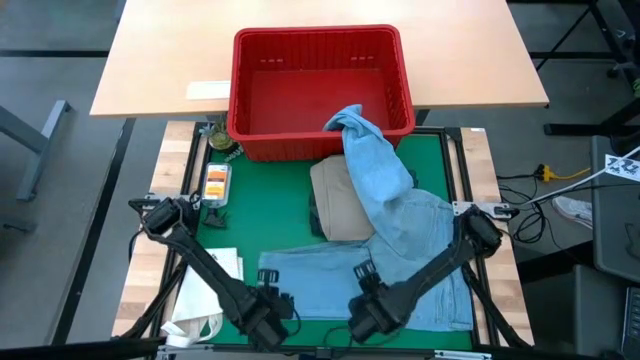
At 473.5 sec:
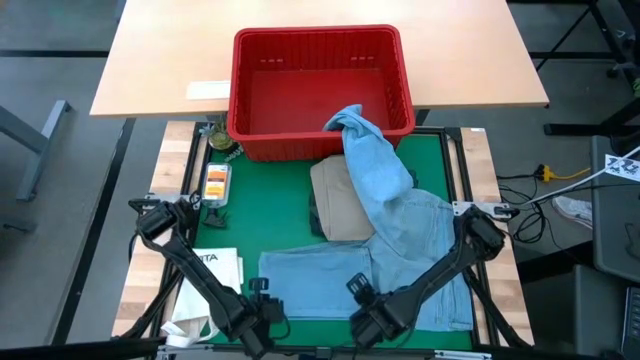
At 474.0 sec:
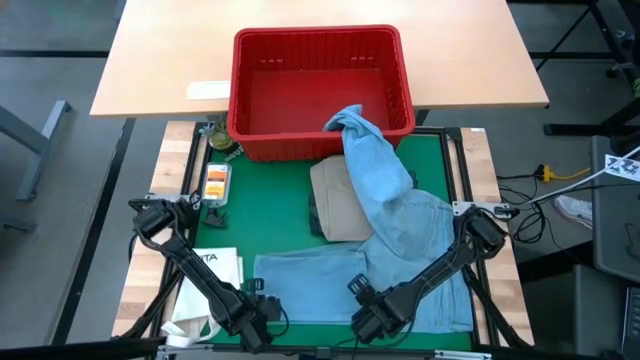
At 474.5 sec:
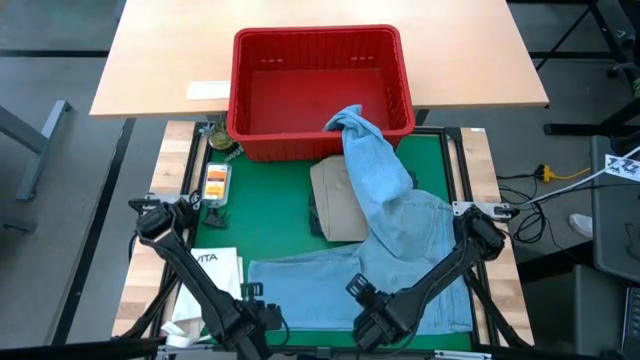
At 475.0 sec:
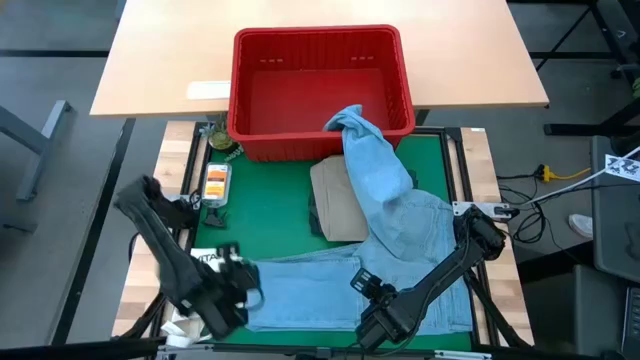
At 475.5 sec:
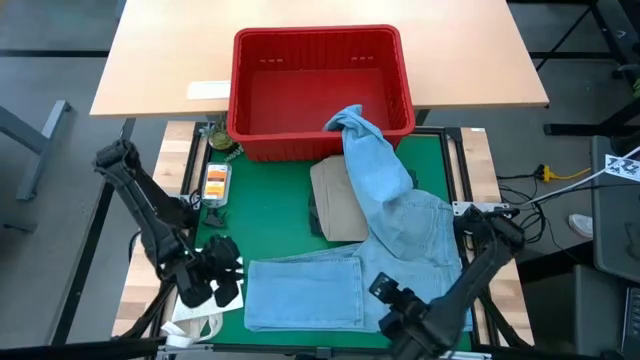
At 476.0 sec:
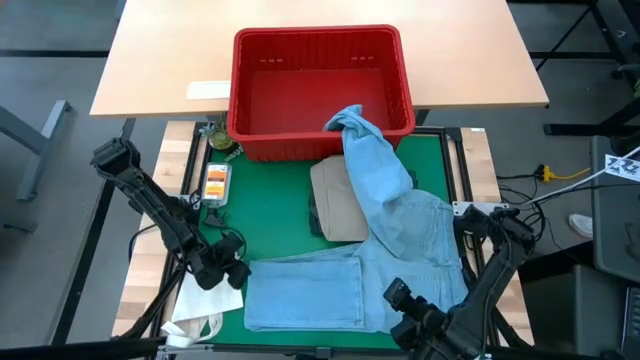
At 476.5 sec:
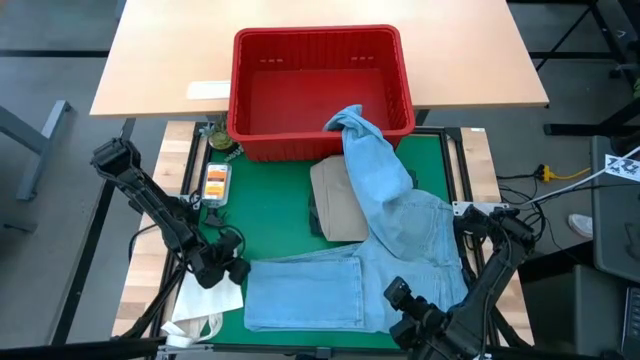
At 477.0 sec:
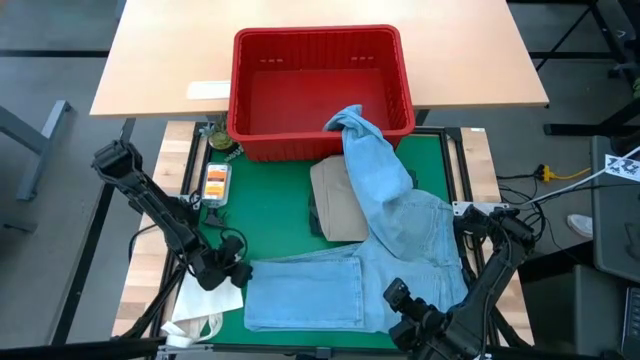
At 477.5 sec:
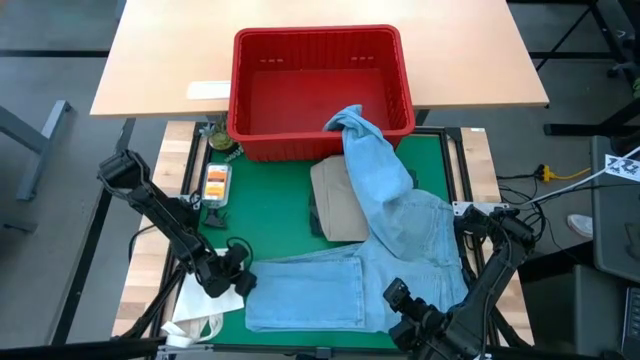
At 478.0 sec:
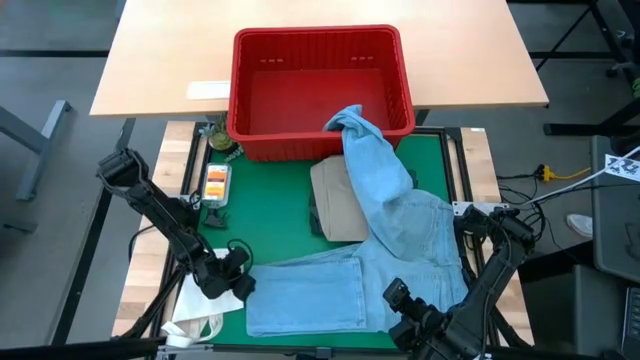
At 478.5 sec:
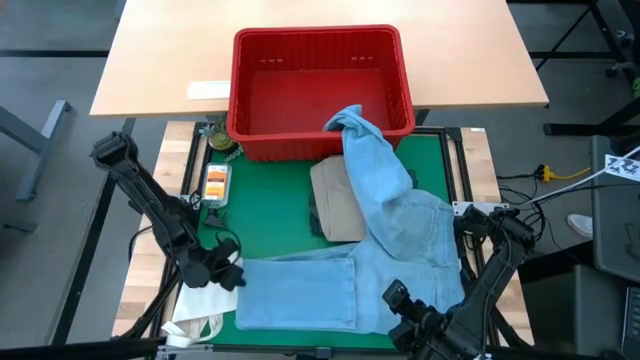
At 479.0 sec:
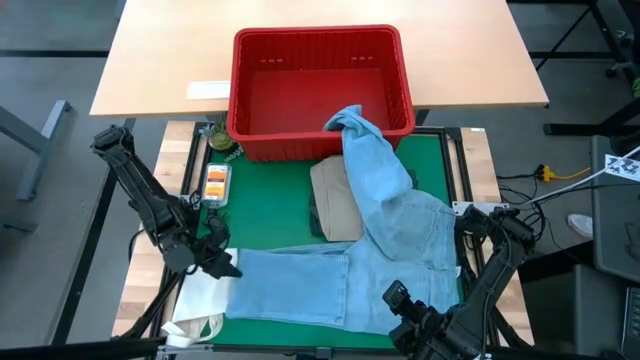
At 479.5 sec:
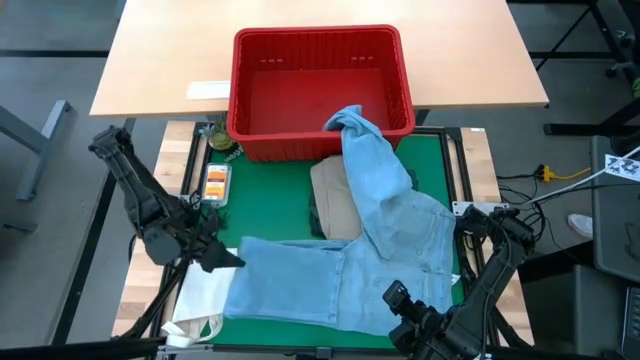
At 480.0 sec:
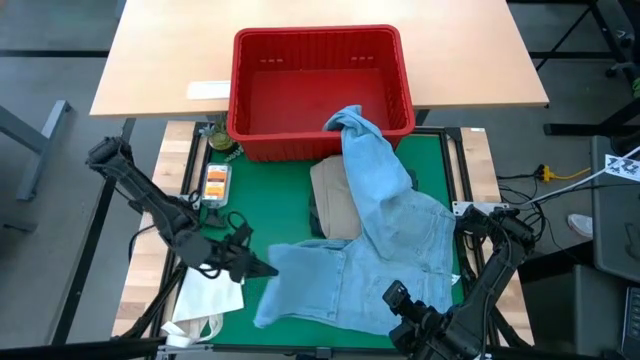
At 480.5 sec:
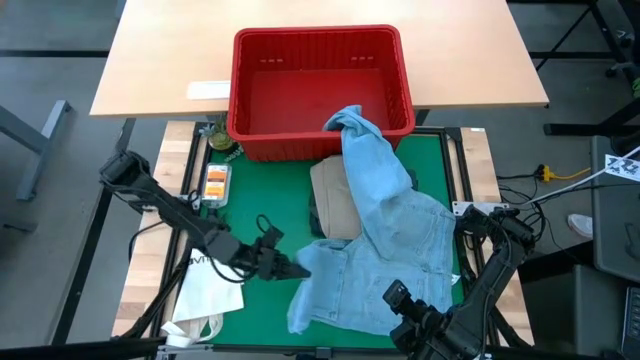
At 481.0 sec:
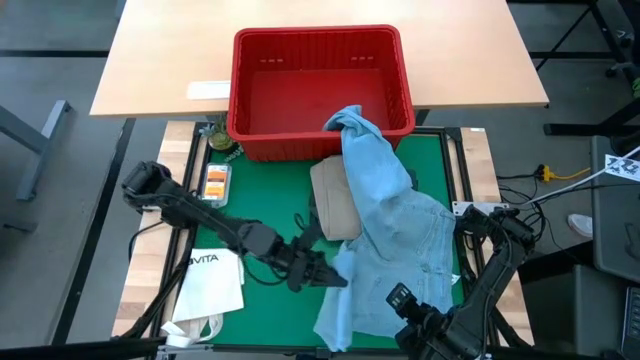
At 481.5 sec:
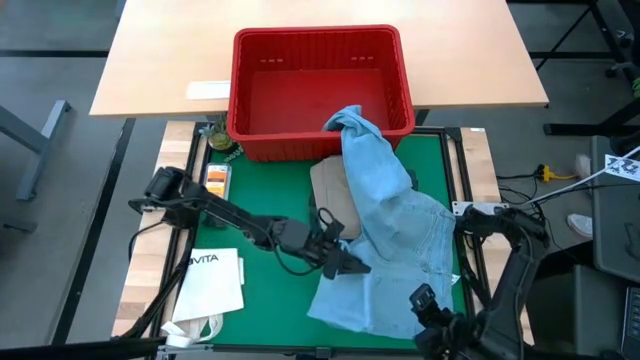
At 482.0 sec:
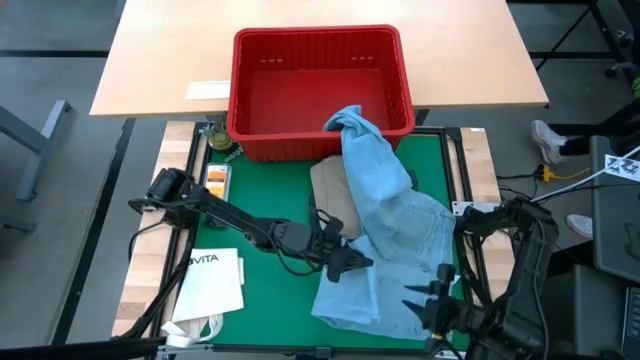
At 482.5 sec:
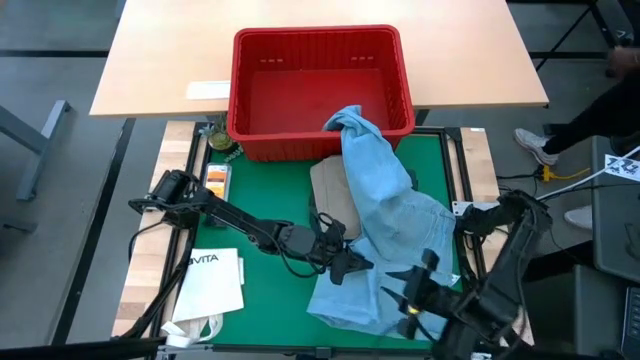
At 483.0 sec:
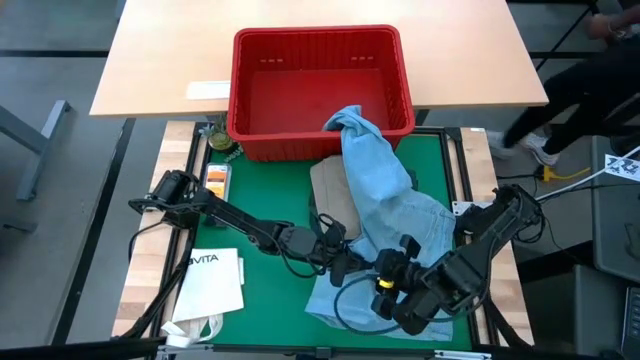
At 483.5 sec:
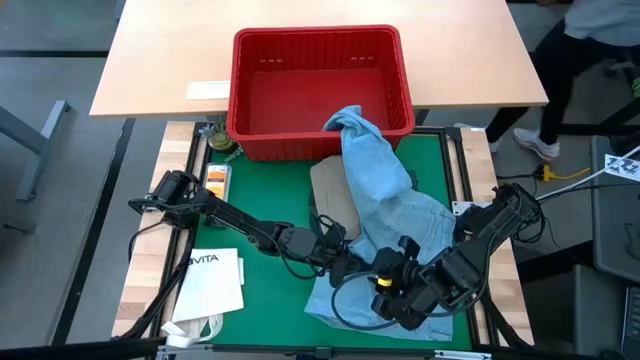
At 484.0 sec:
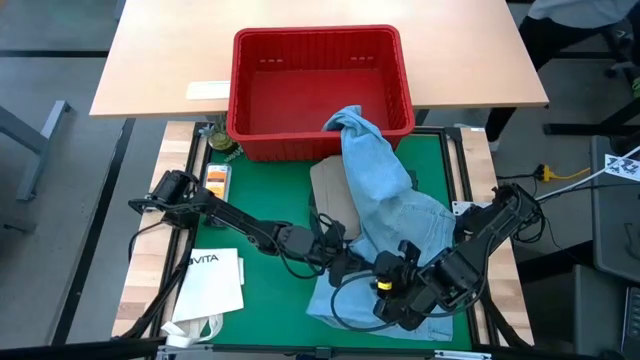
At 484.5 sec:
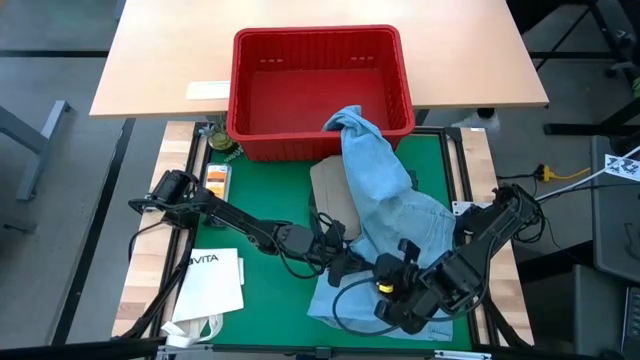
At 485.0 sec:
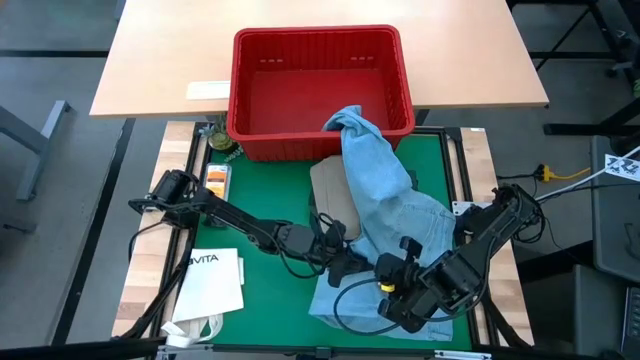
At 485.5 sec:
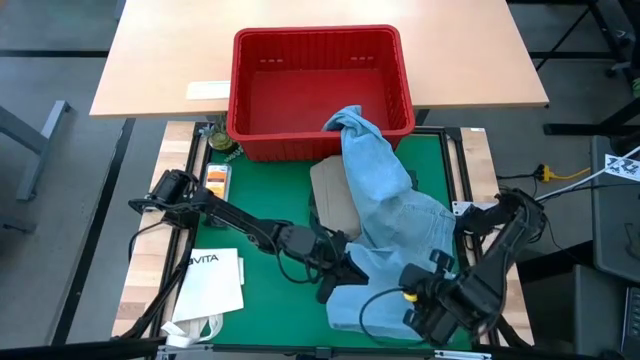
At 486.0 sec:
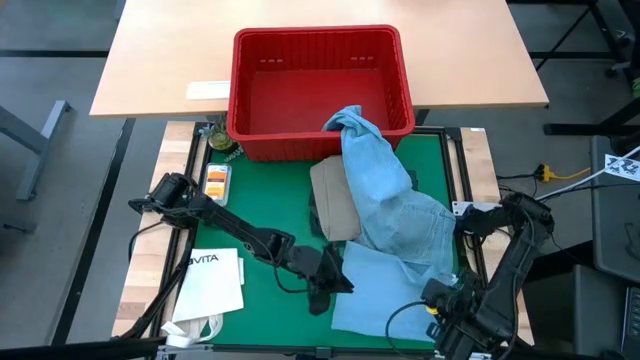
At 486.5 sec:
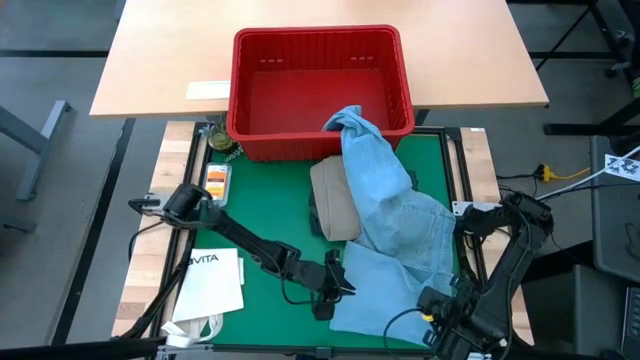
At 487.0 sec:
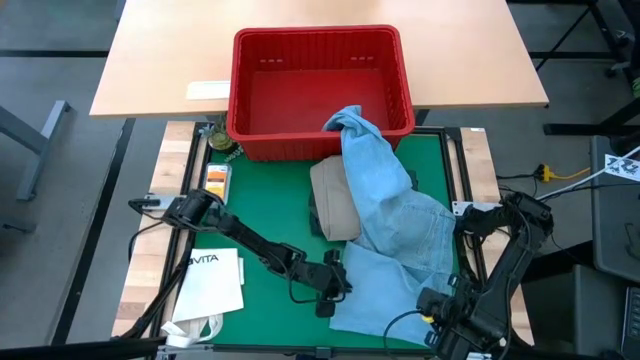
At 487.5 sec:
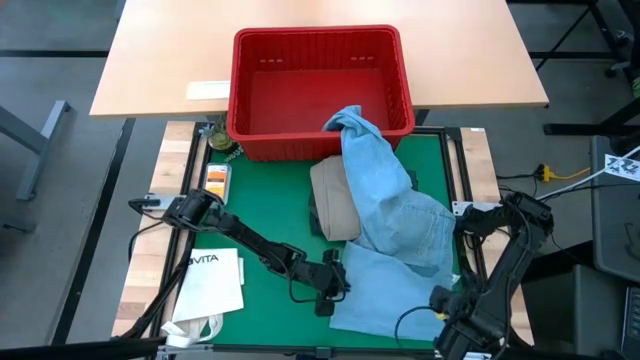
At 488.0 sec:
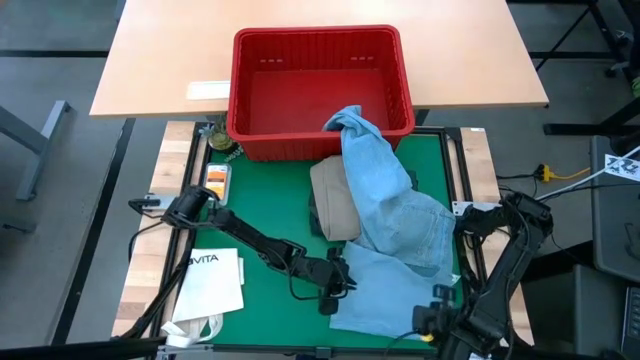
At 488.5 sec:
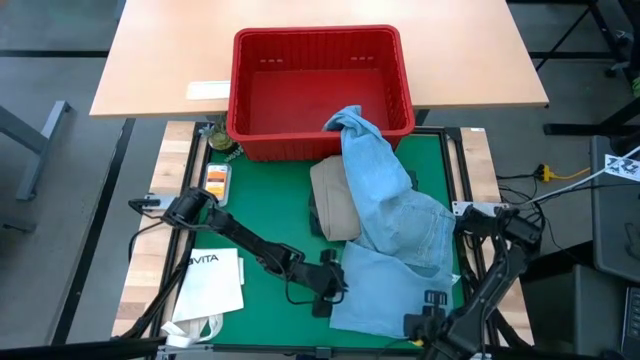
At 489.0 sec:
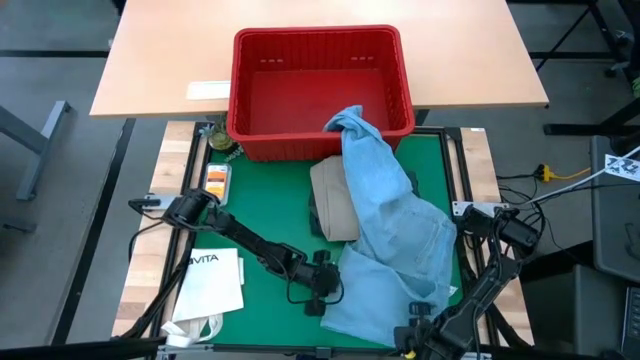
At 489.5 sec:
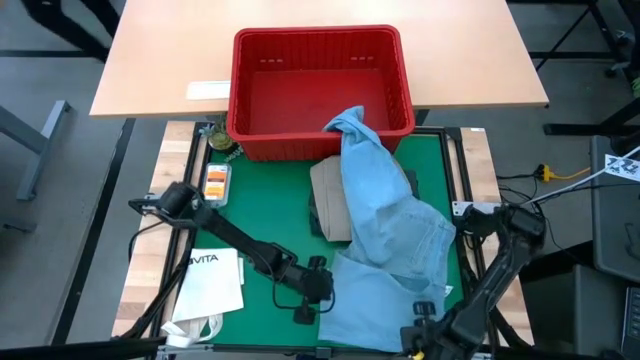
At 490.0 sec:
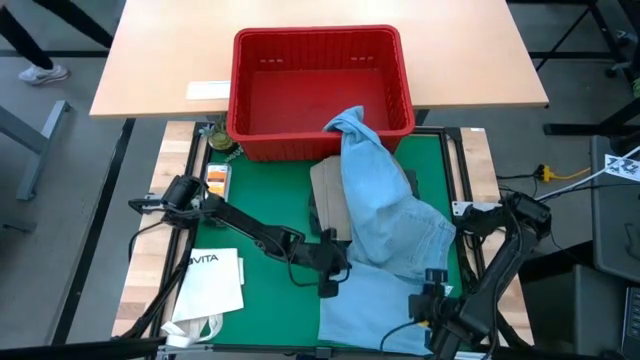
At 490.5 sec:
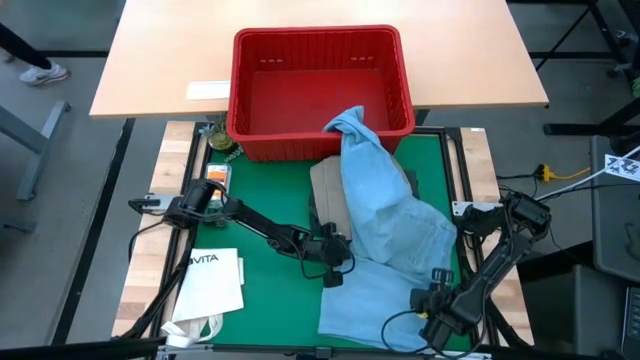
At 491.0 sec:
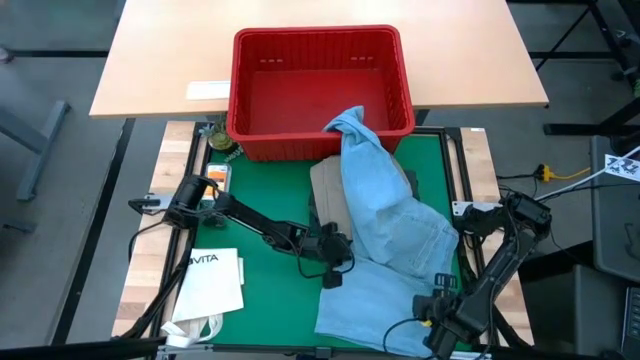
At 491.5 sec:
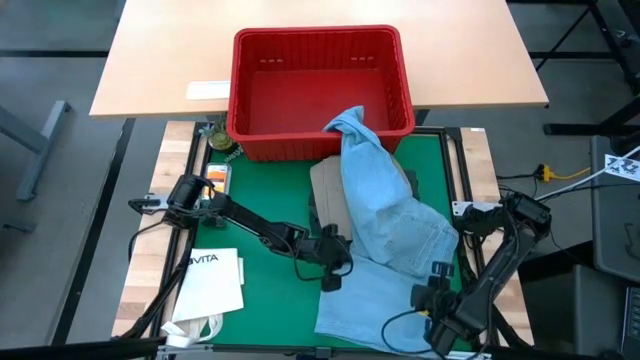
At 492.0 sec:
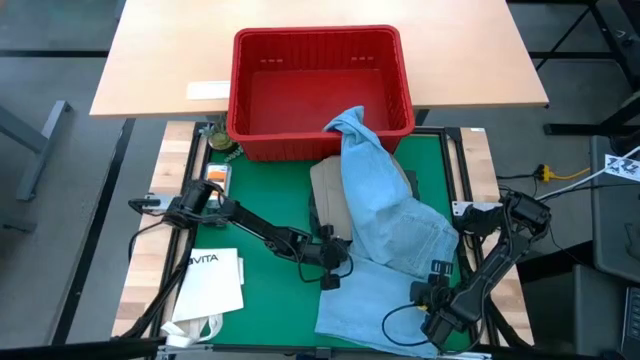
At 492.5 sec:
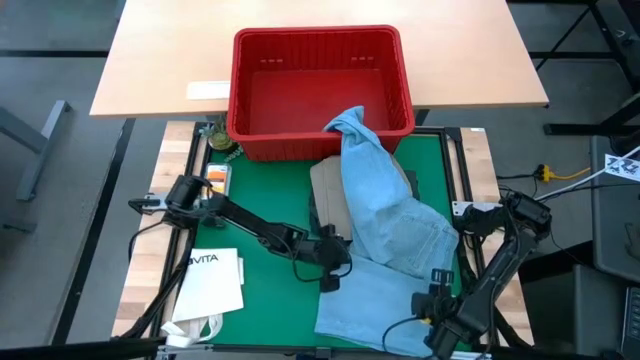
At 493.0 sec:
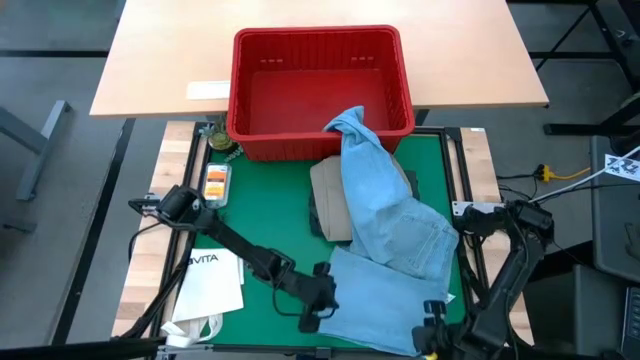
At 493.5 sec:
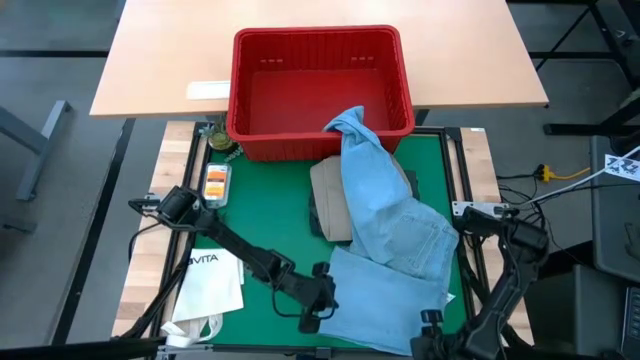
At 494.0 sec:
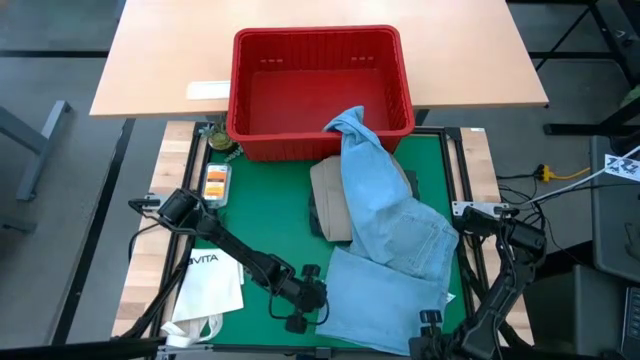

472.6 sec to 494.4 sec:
Task: Fold Laundry from Bin
Fold the light blue pants
